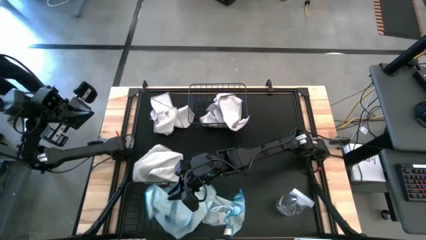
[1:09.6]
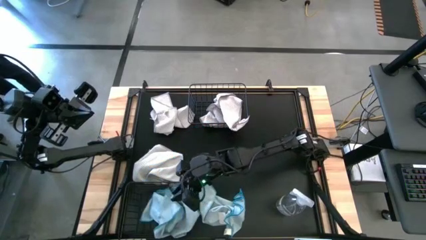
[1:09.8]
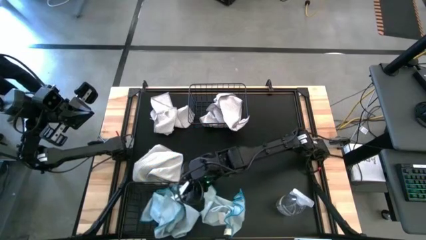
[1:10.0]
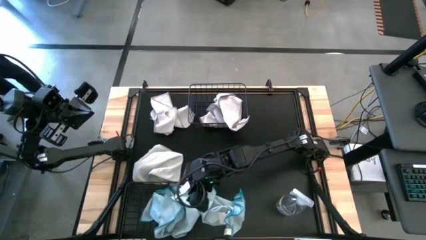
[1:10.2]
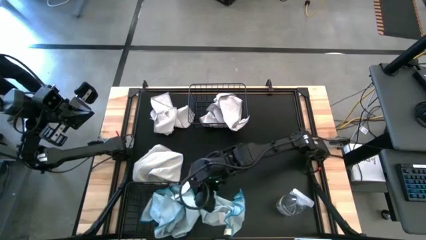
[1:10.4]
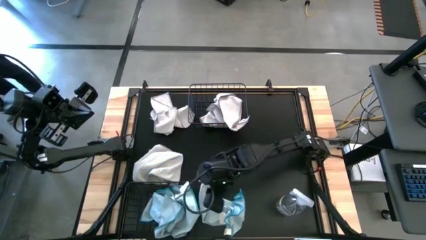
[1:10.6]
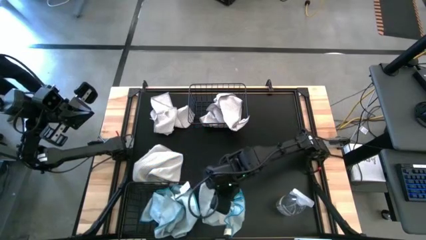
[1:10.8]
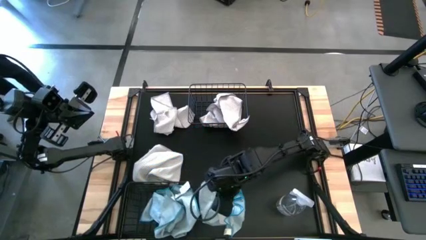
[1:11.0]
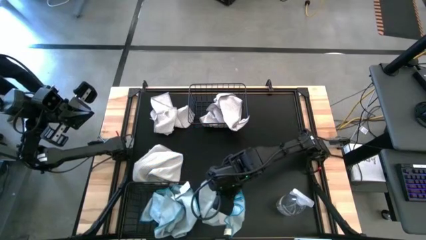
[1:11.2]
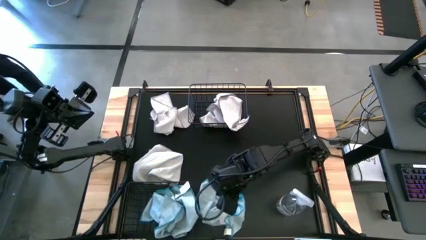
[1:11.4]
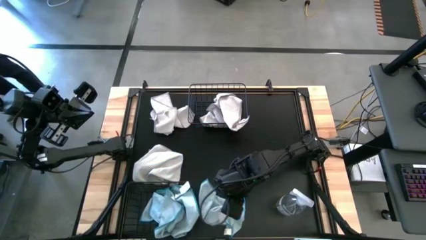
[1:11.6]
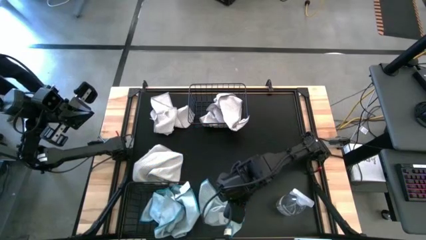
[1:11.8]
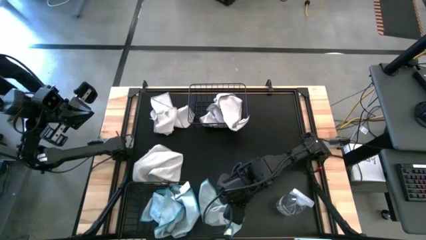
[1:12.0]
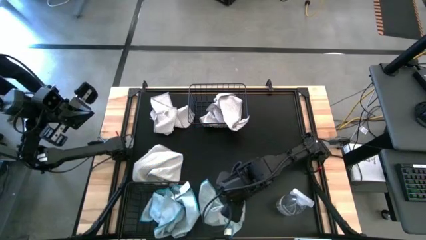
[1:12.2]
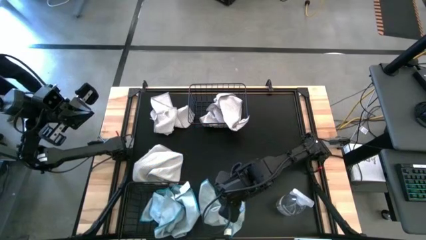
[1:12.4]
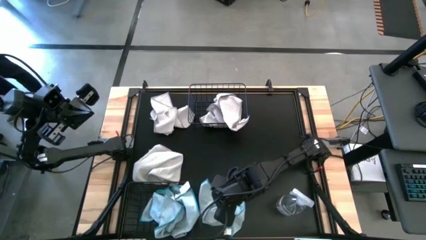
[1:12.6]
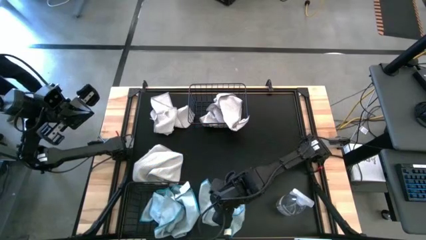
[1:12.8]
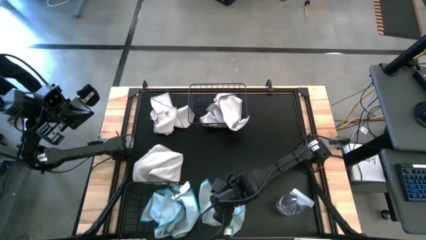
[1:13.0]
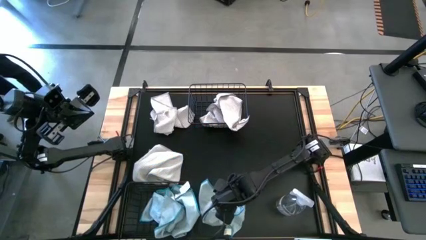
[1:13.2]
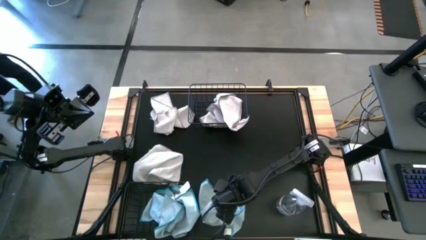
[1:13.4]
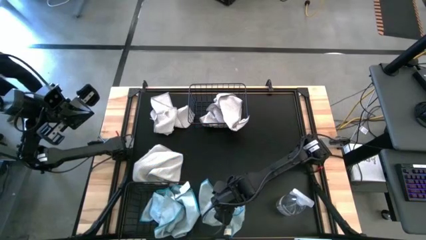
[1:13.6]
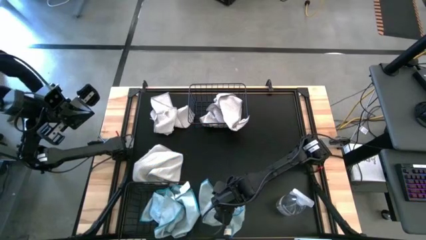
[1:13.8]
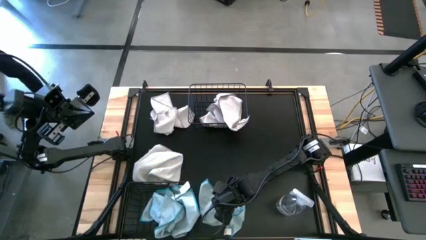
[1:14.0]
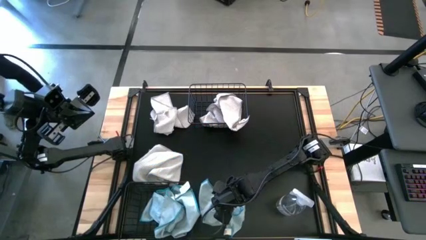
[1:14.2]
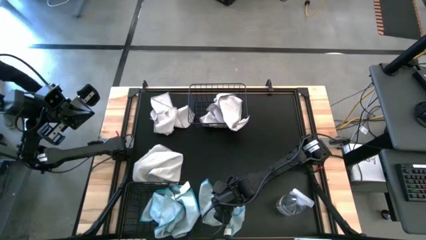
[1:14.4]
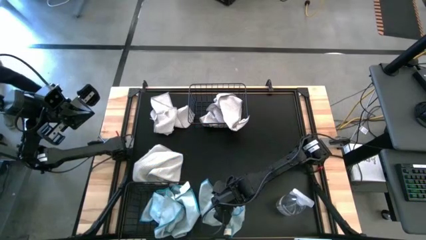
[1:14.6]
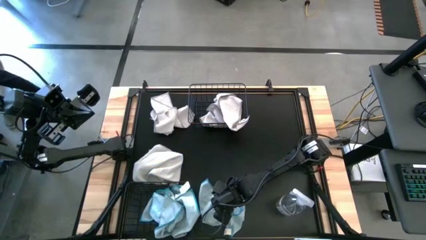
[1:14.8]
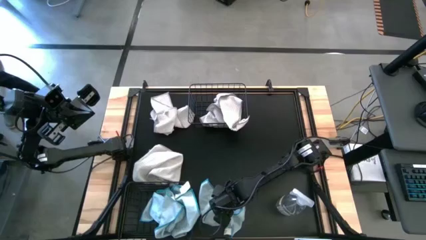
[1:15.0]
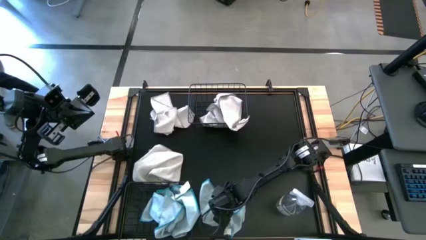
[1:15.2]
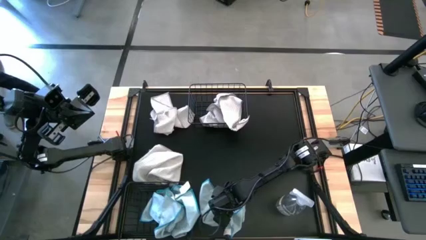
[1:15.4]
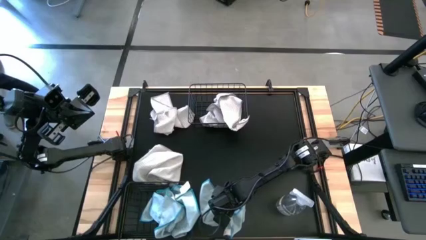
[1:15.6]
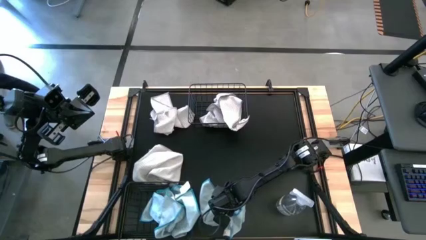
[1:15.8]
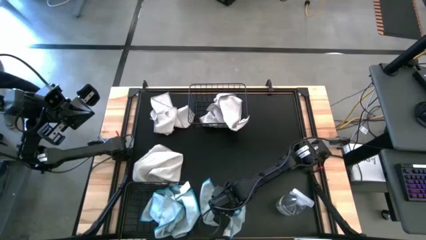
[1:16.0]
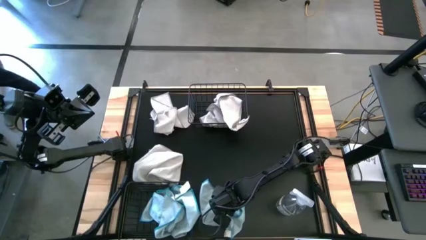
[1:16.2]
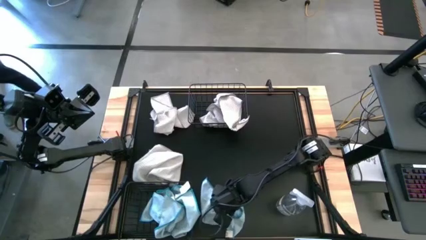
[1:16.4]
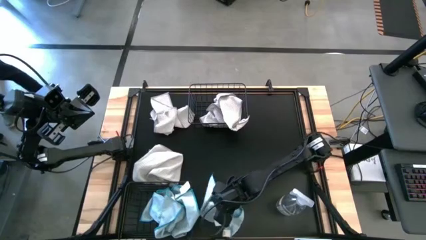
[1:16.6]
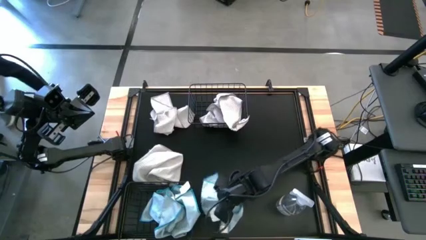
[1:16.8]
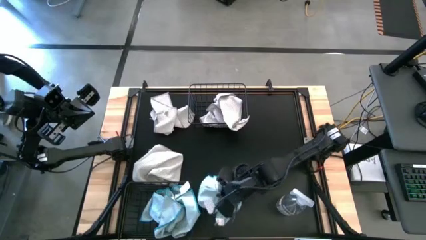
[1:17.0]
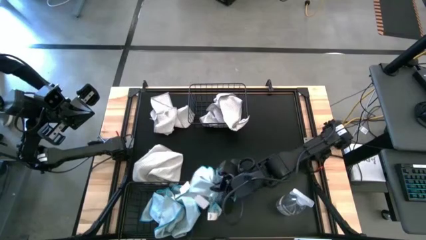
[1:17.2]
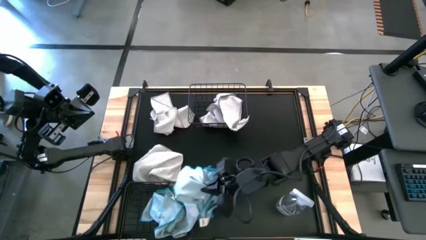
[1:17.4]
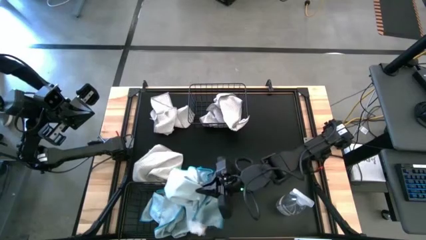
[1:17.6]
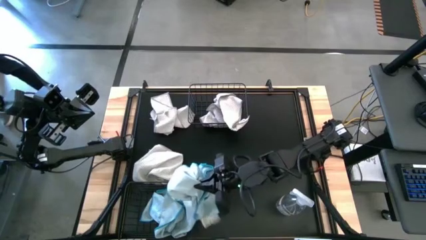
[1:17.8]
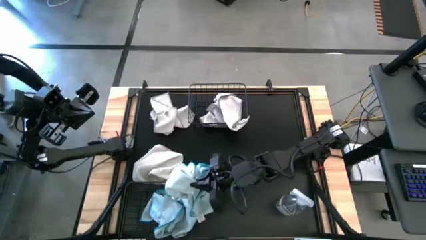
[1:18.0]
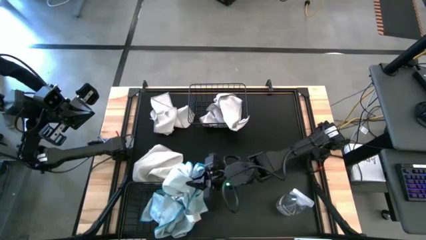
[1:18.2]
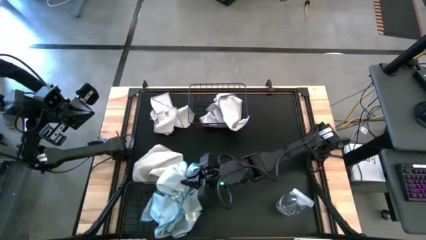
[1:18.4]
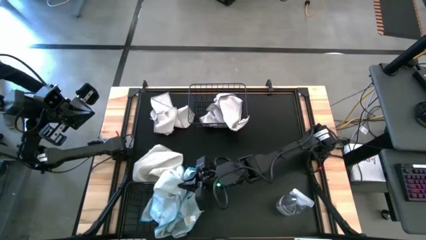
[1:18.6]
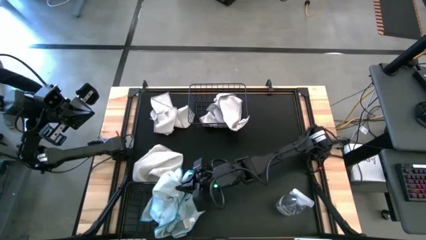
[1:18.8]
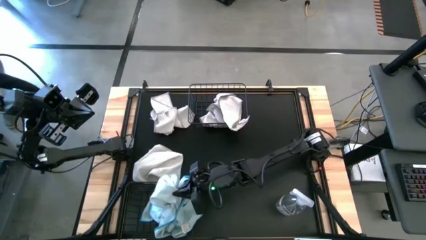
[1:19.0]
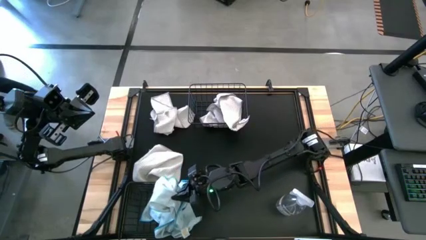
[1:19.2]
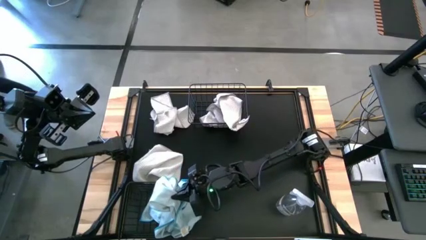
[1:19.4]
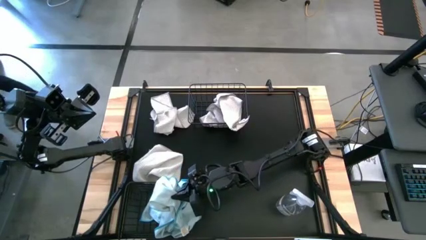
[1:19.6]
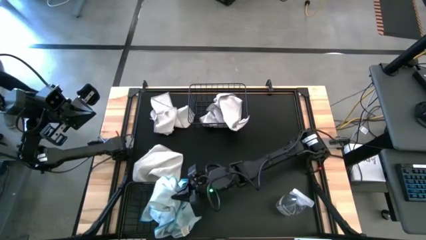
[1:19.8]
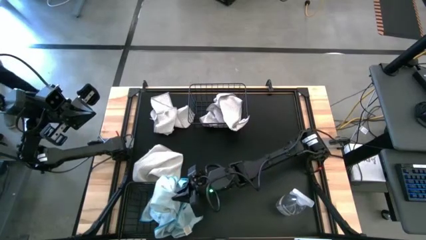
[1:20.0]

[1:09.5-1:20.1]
Task: Sort microfiber towel by color & place in baskets
Put the blue microfiber cloth into the bottom wire basket
